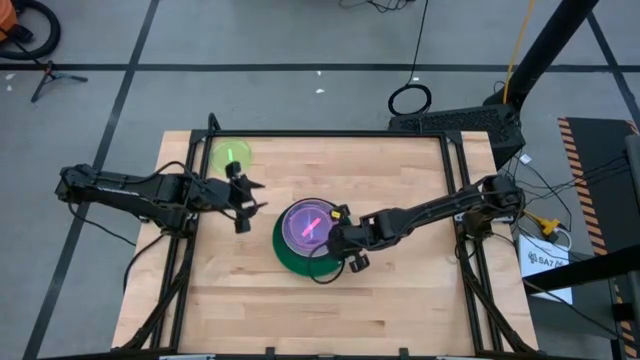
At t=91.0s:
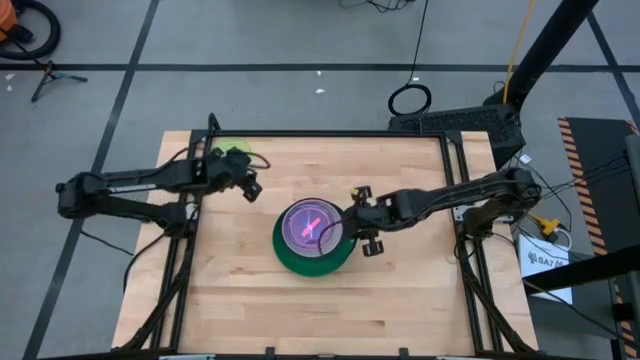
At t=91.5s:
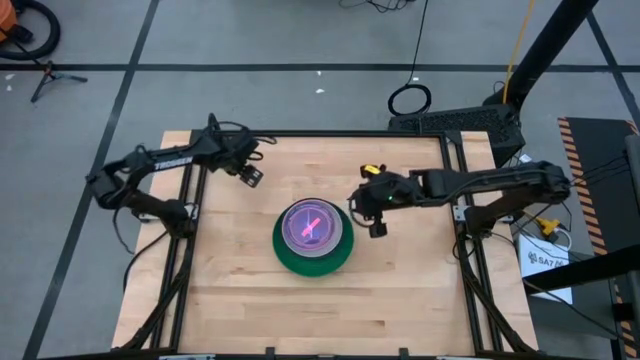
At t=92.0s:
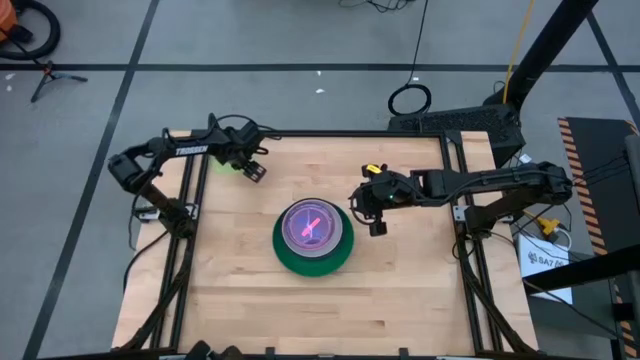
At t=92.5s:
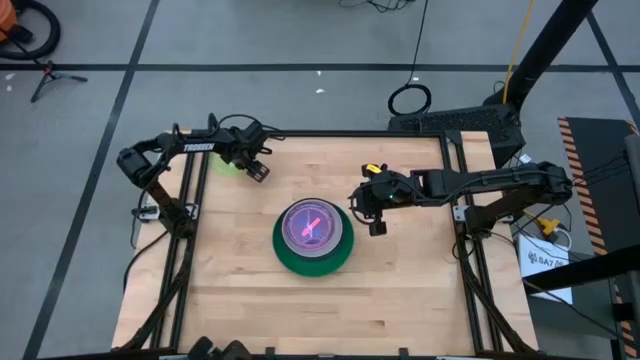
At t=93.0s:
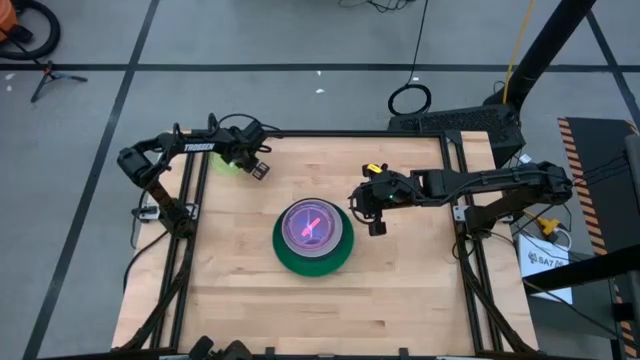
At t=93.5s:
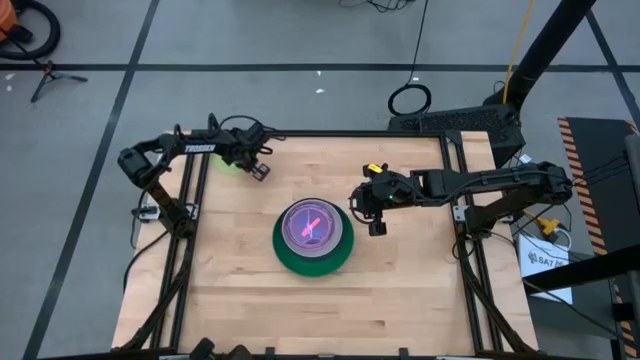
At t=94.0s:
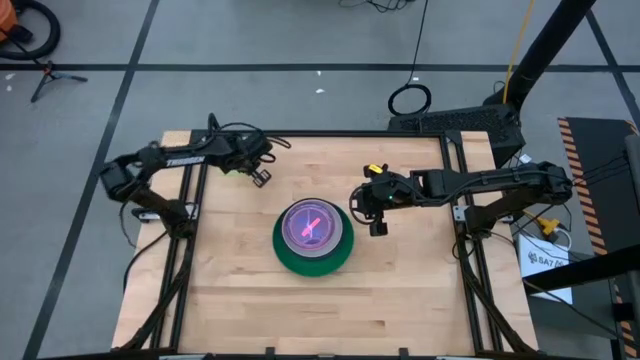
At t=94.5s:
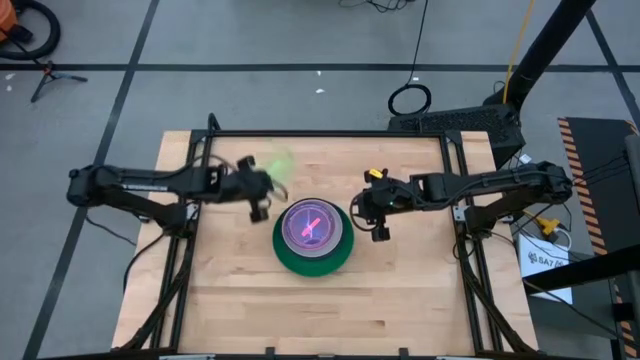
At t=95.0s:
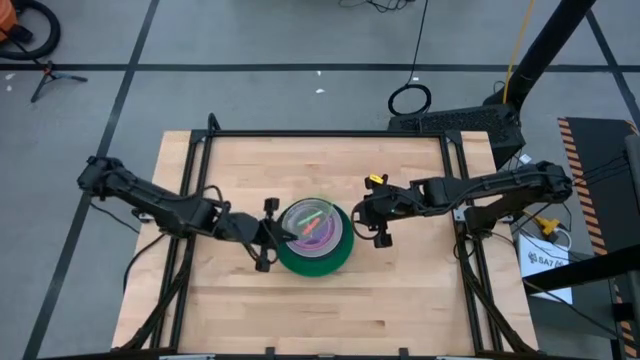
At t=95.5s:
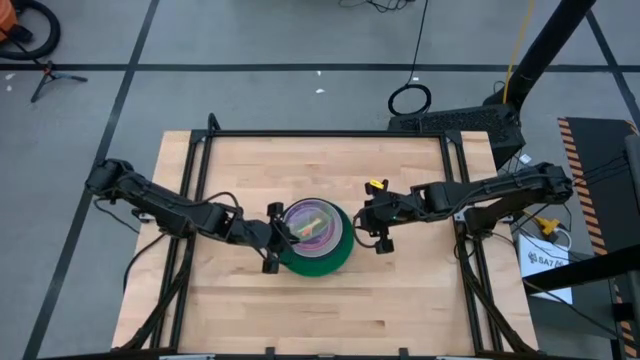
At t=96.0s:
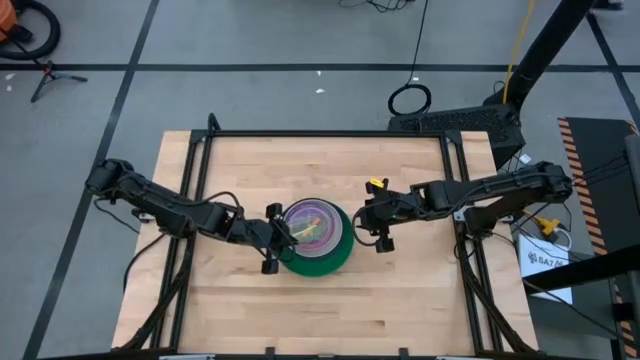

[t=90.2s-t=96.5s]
Task: Stack plastic plates
Stack the light green plate on top of the pink plate

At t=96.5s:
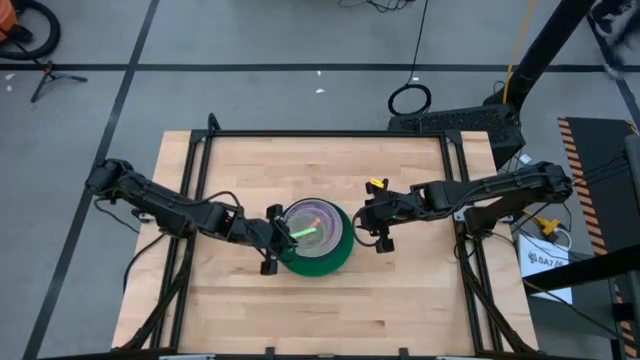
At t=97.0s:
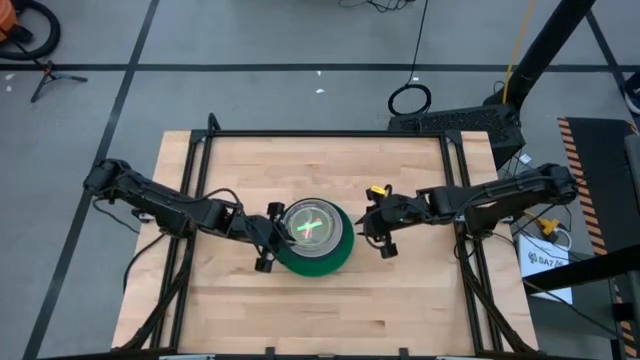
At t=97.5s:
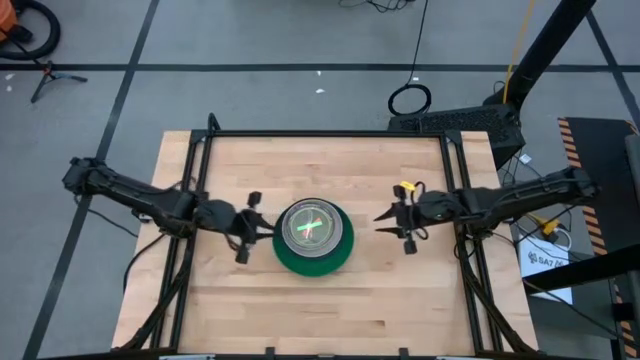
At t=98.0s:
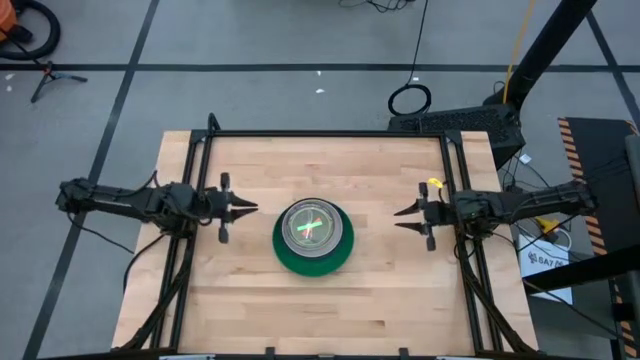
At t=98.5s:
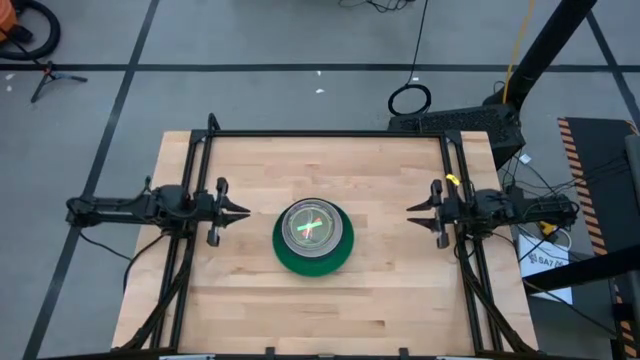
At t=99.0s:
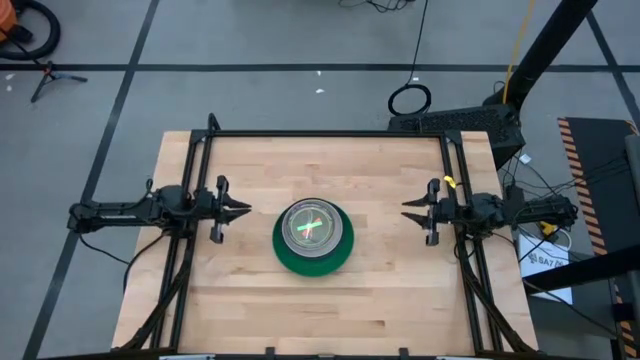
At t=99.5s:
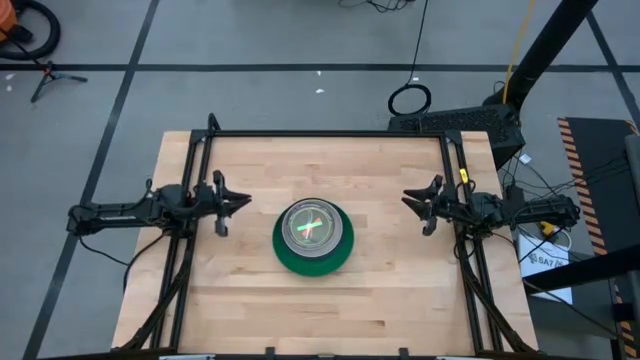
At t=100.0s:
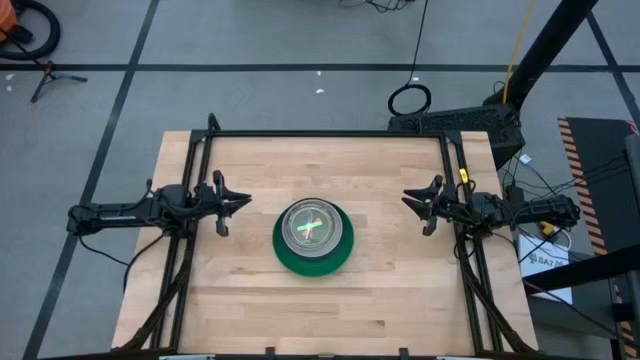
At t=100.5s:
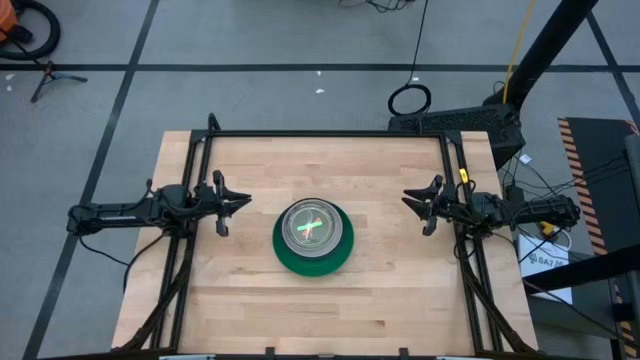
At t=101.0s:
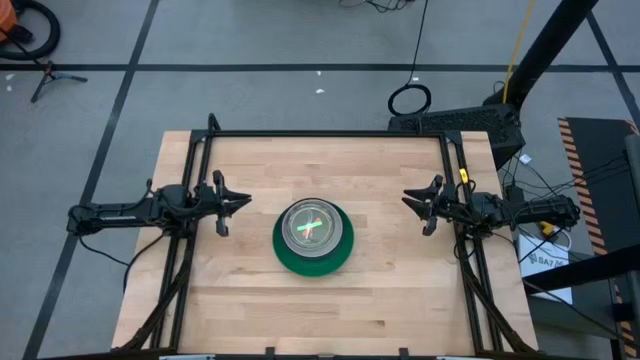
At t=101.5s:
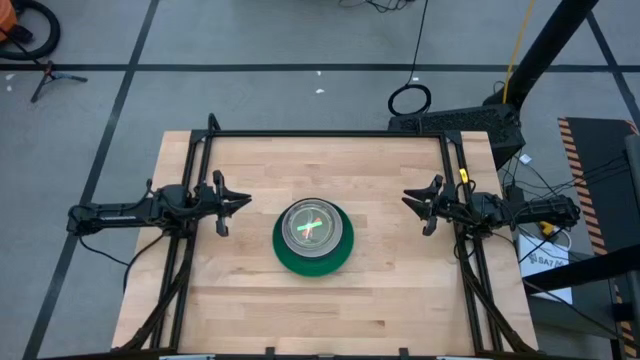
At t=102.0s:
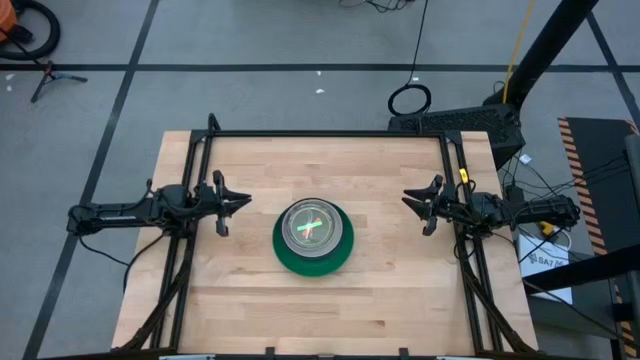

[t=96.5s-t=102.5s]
Return to Home Position

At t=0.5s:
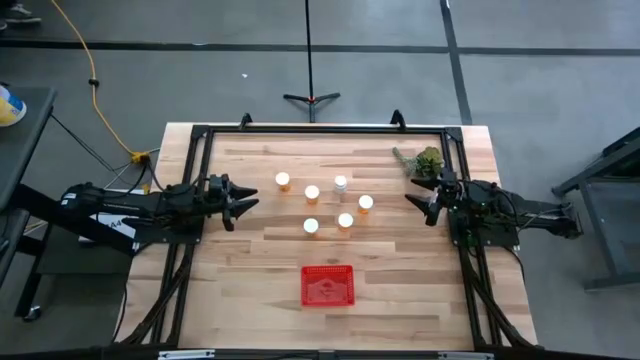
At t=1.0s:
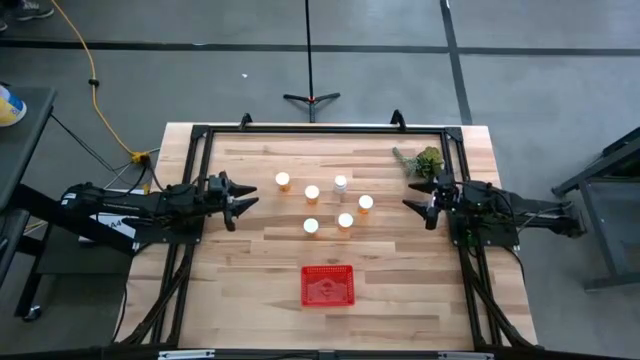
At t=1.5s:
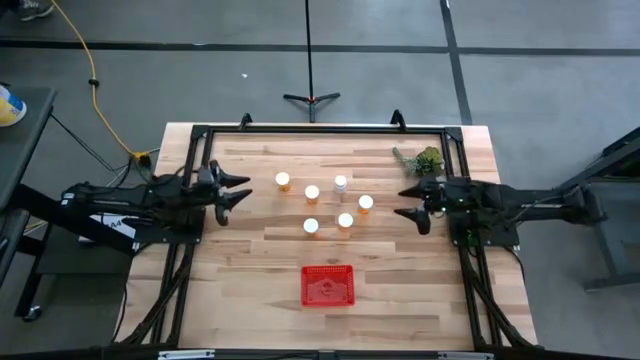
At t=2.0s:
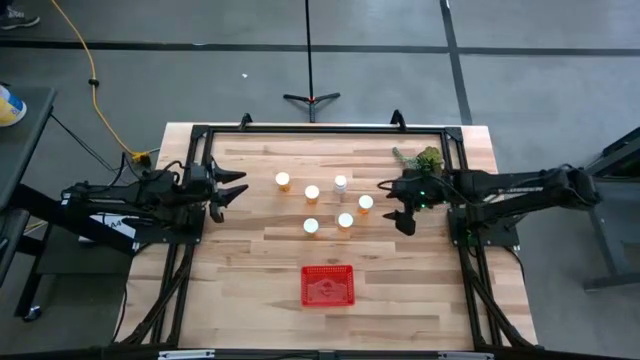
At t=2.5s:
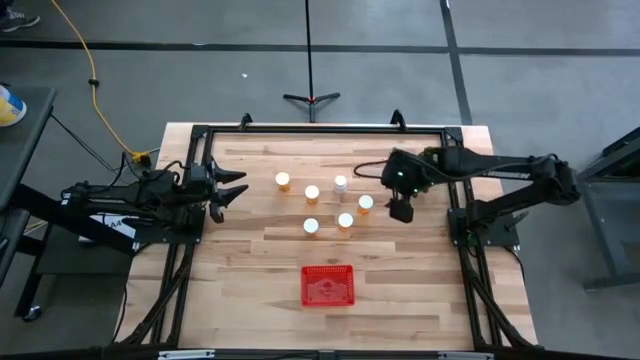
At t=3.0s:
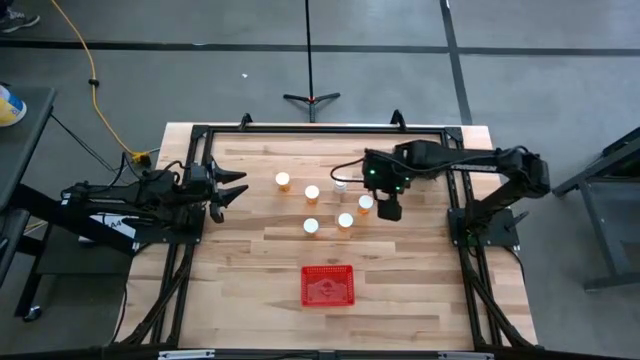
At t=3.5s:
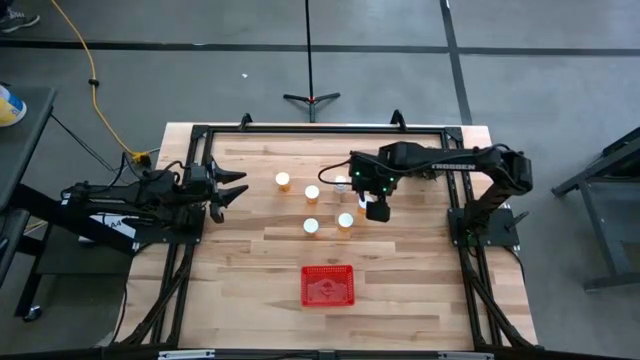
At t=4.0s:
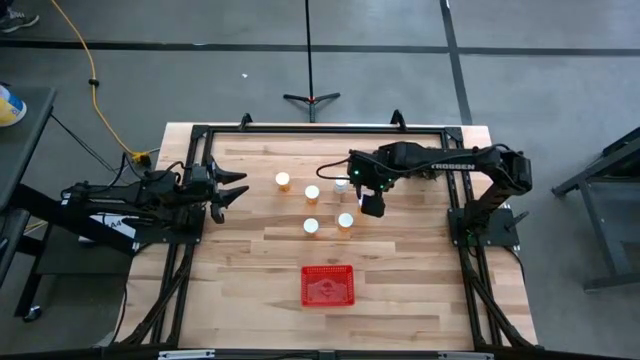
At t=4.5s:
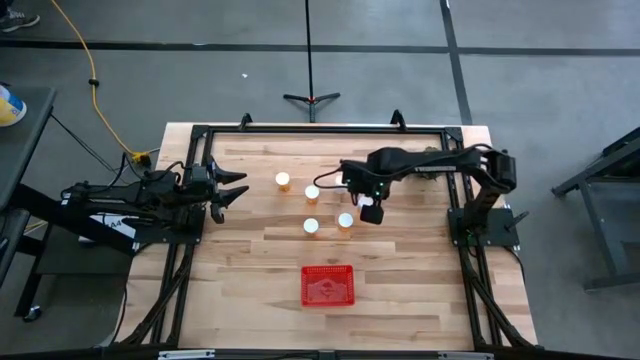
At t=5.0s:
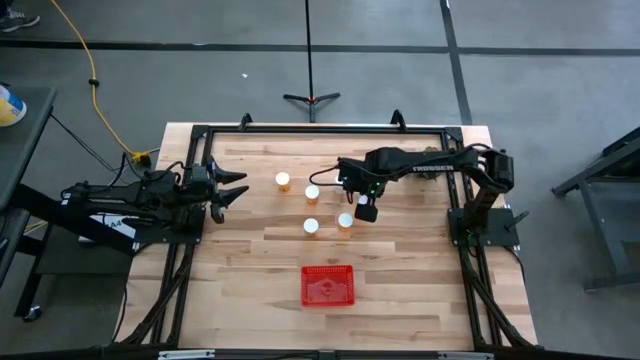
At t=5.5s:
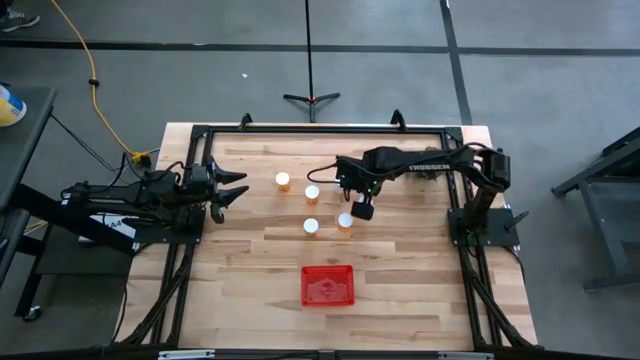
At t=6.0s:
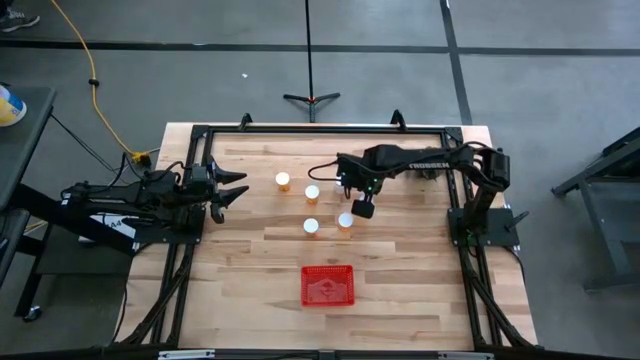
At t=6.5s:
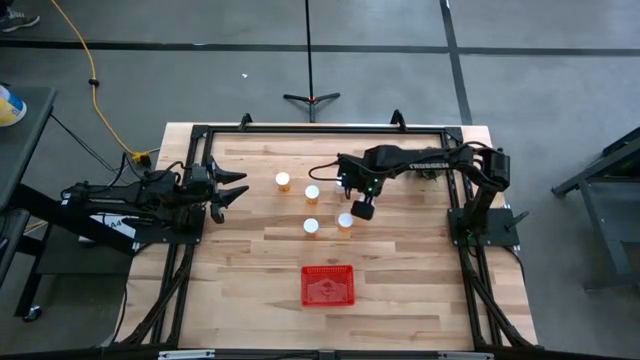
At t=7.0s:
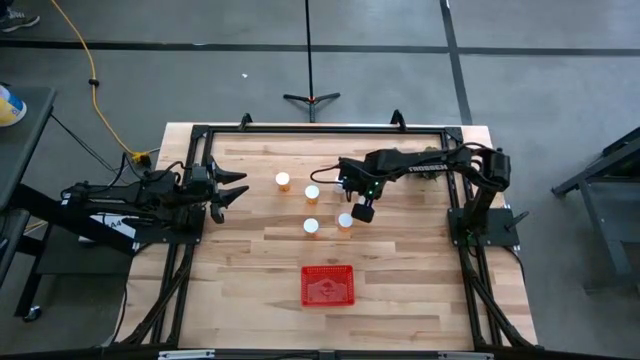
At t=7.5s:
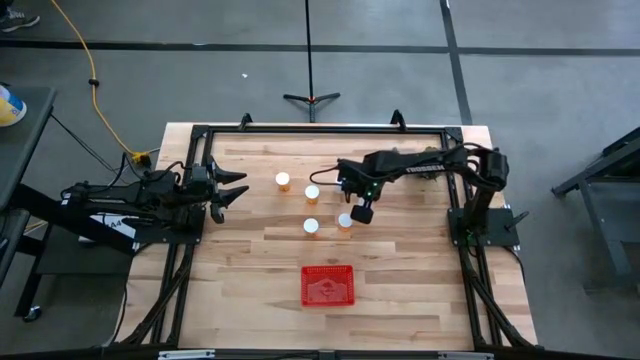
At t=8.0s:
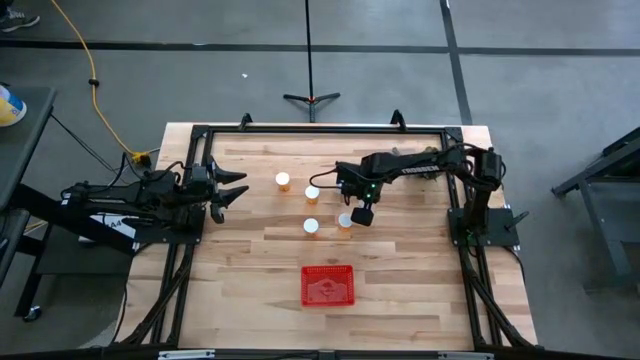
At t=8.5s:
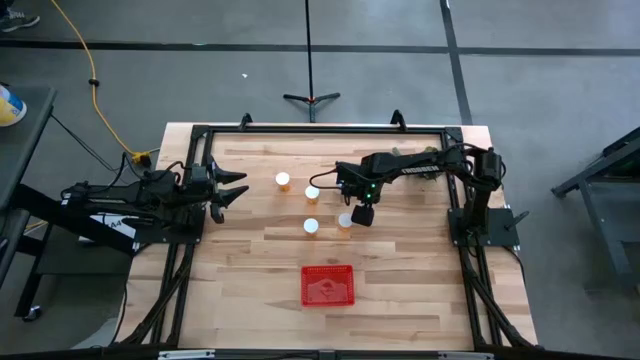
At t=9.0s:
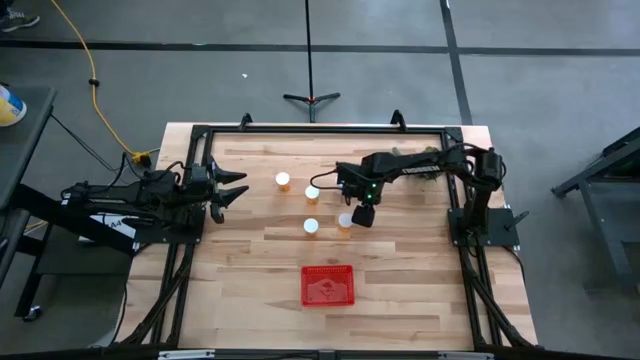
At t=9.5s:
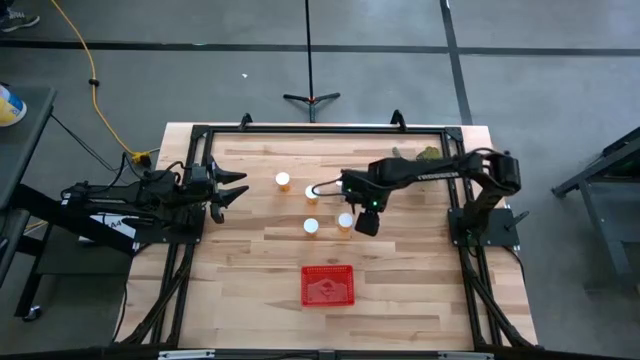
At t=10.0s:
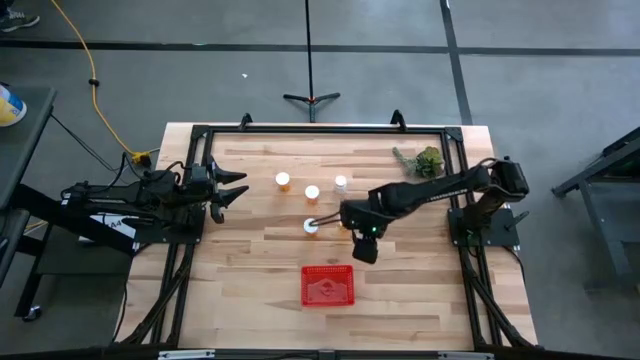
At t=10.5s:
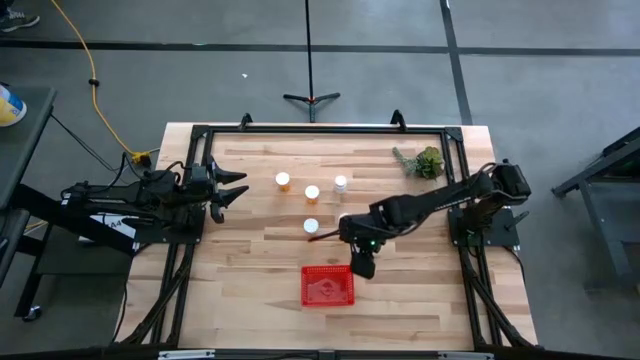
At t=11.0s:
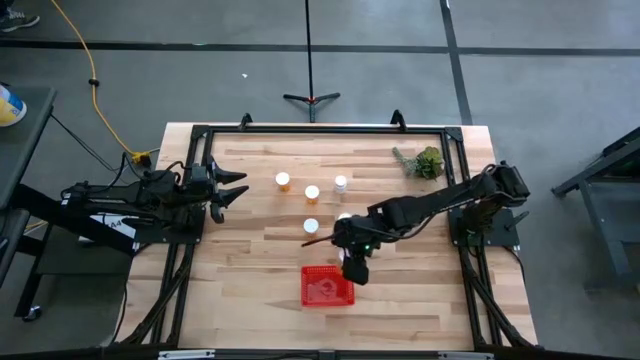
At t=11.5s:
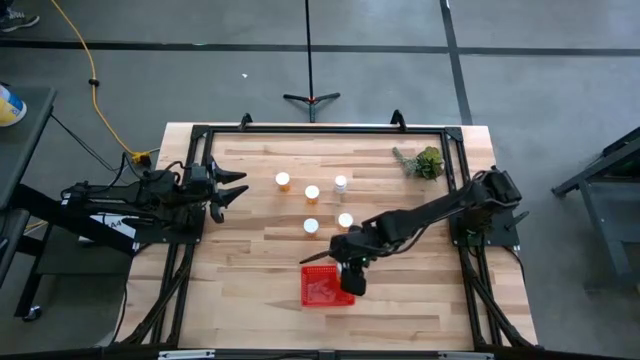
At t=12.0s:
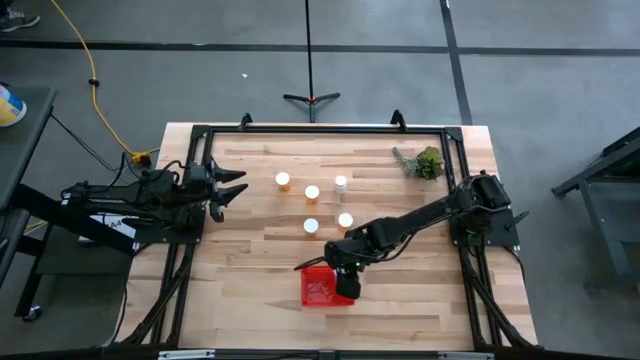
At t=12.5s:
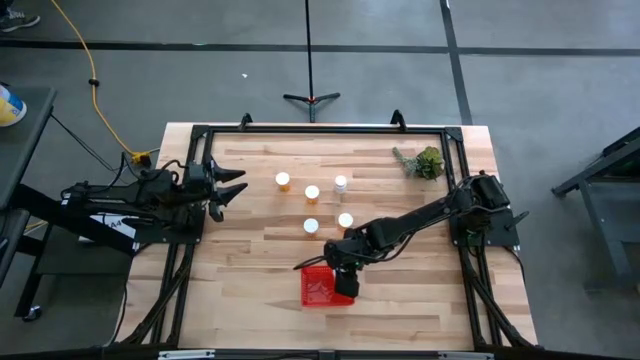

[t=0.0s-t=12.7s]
Task: Pick and place pill bottles into a basket
Put the orange pill bottle into the red basket
